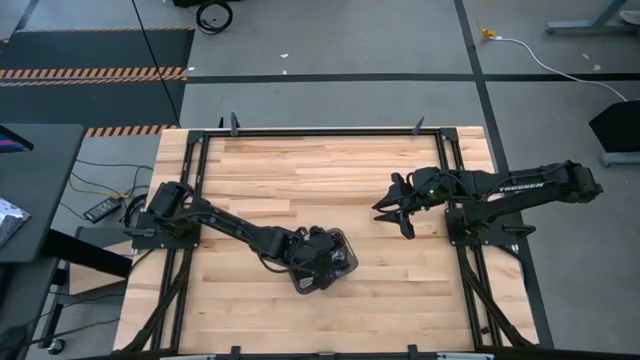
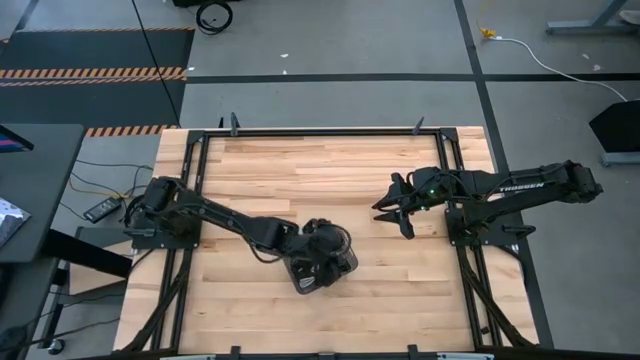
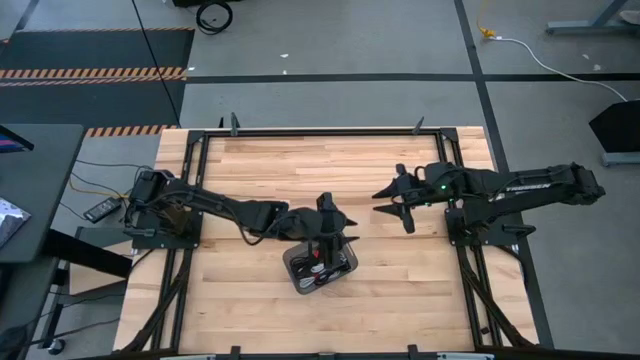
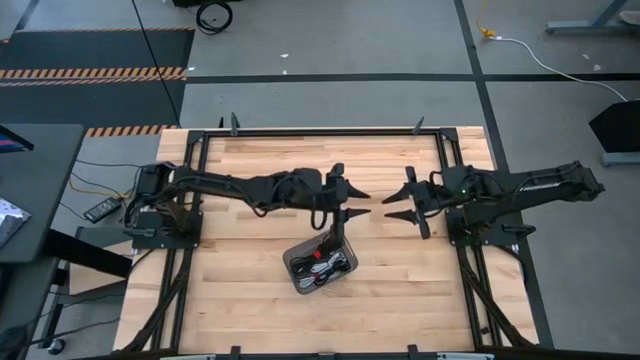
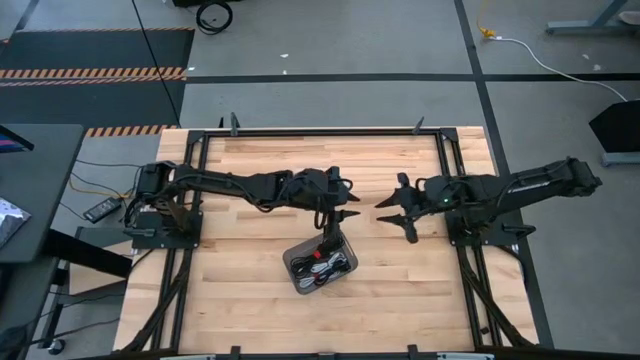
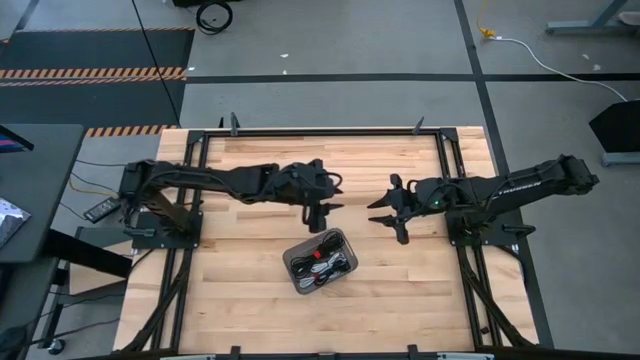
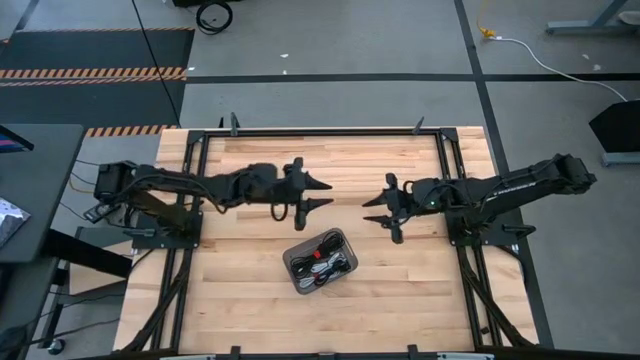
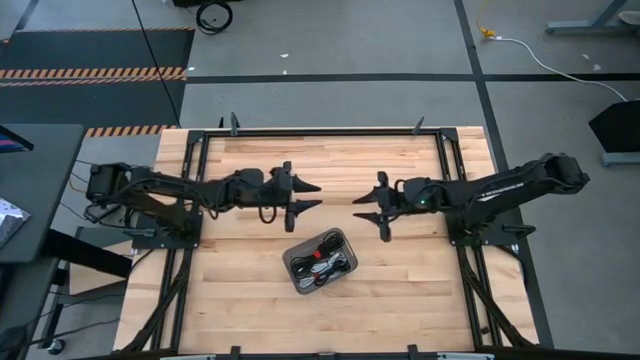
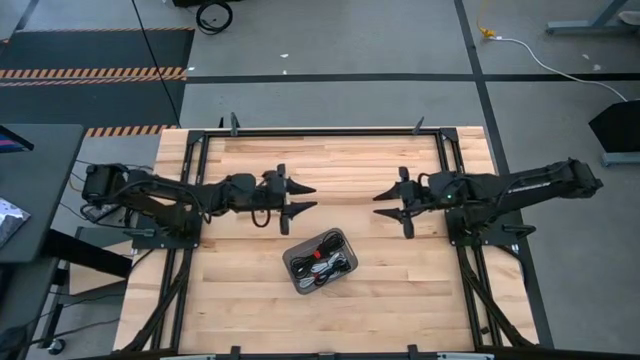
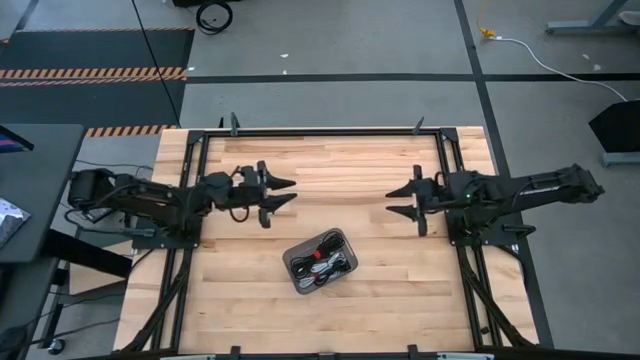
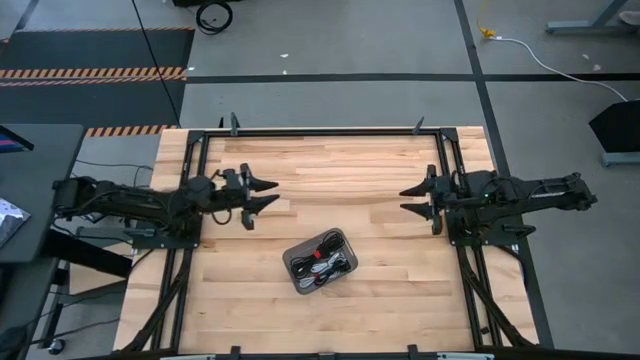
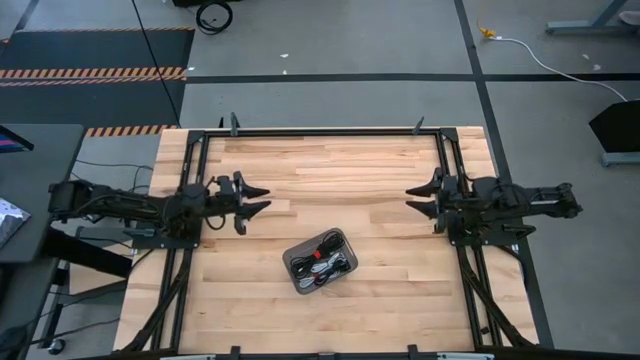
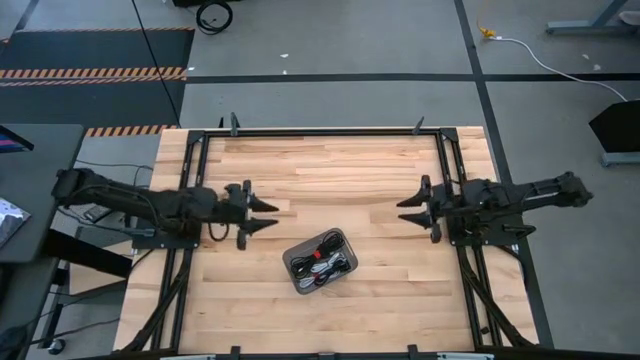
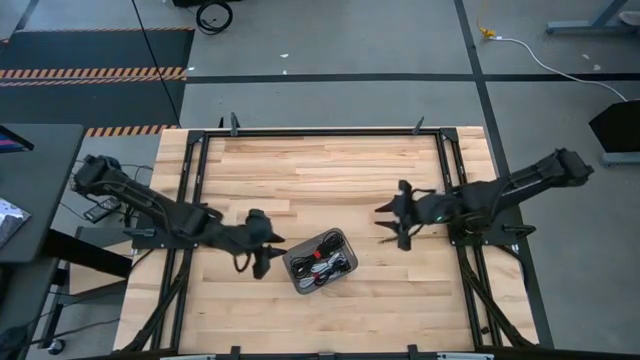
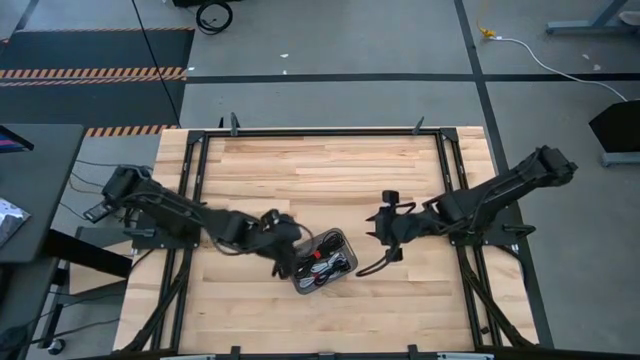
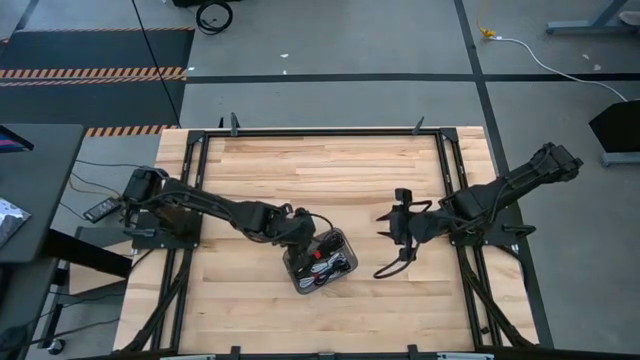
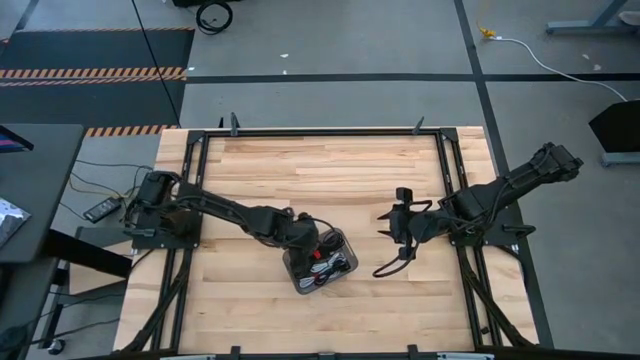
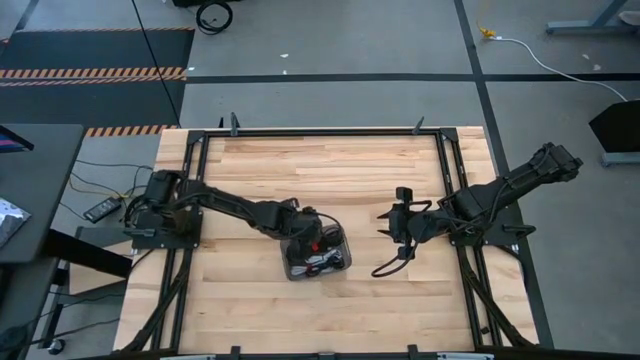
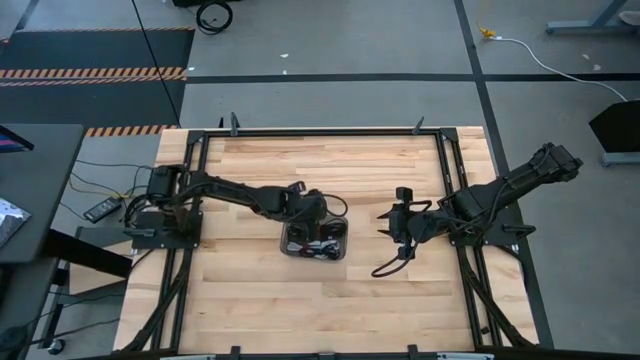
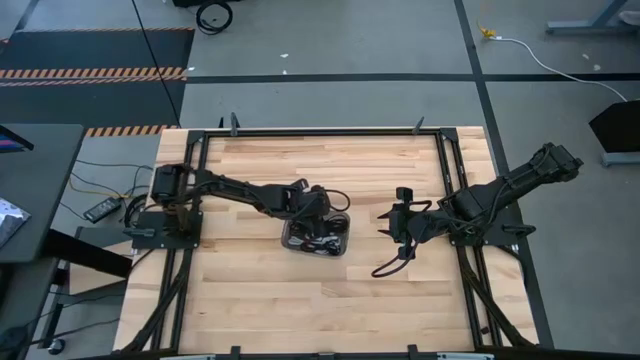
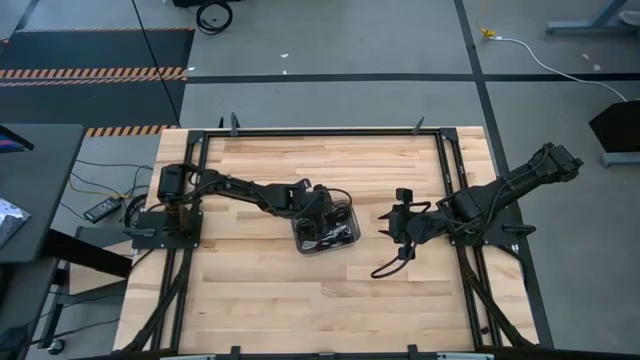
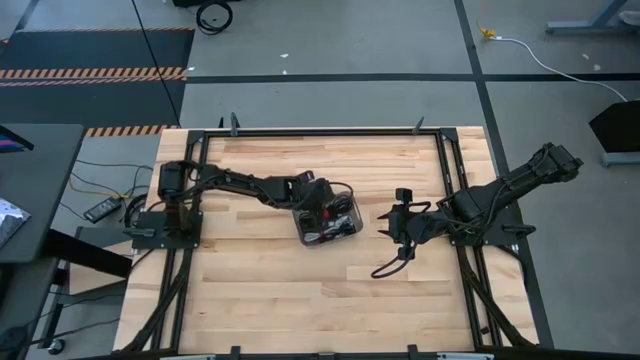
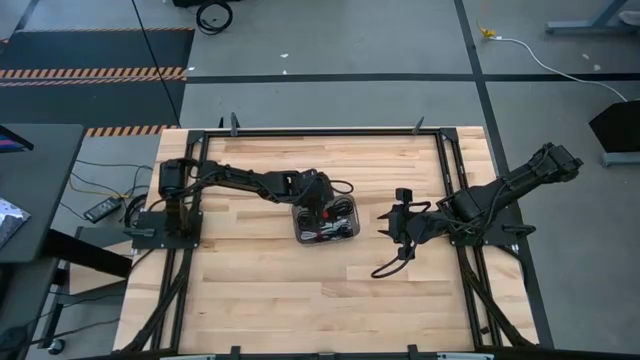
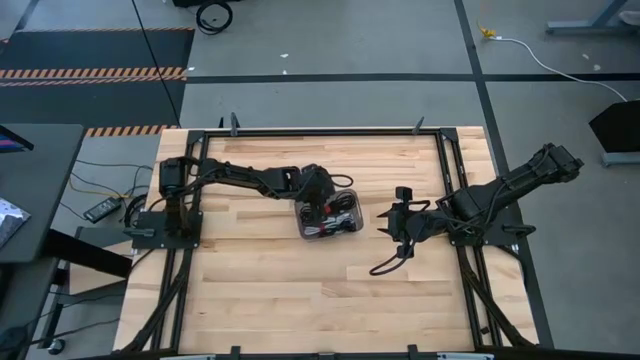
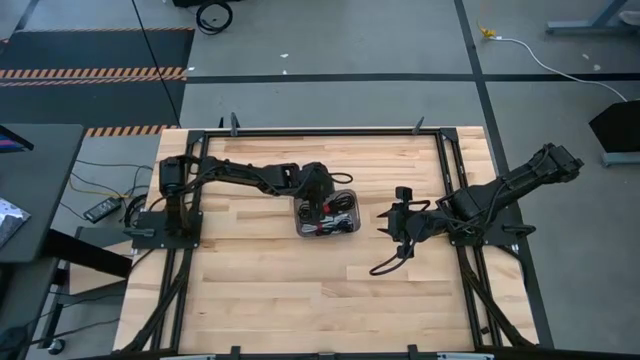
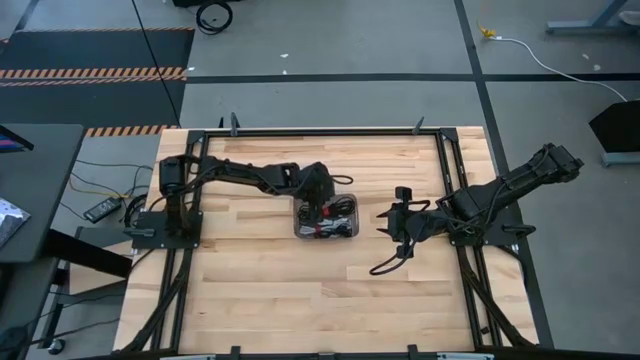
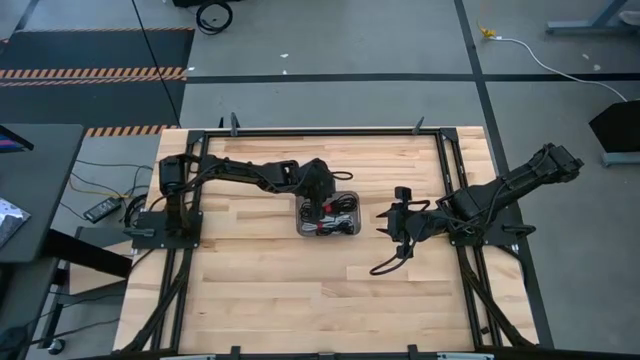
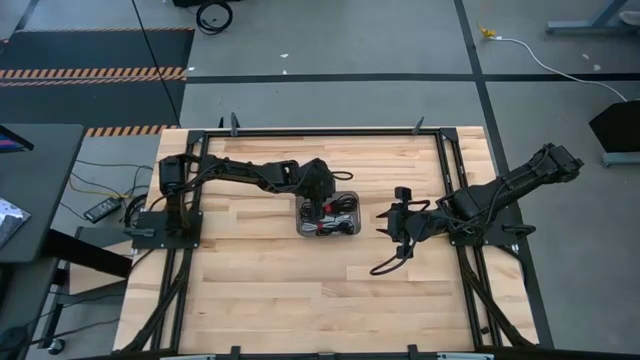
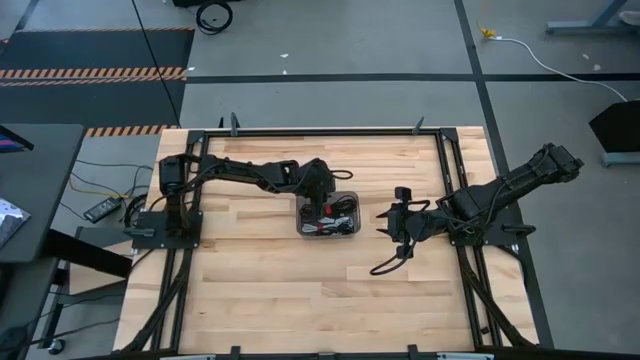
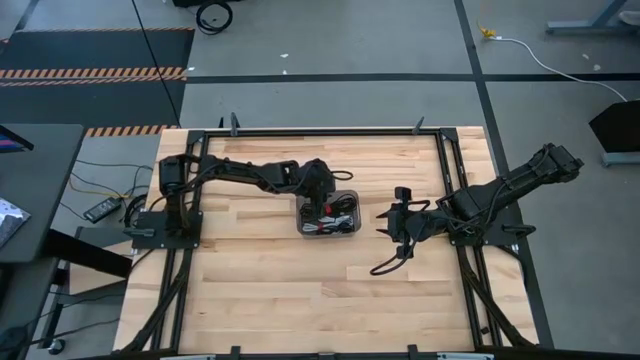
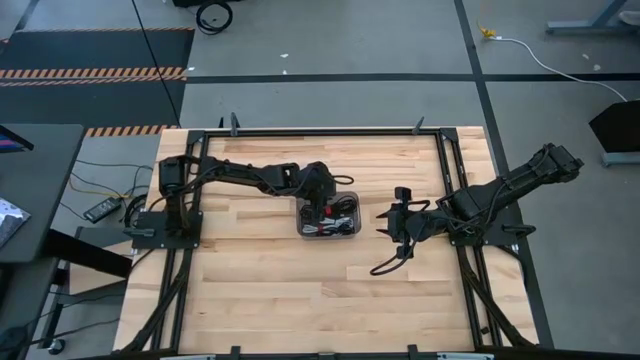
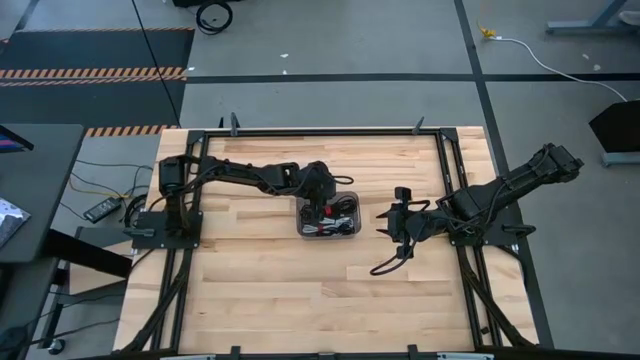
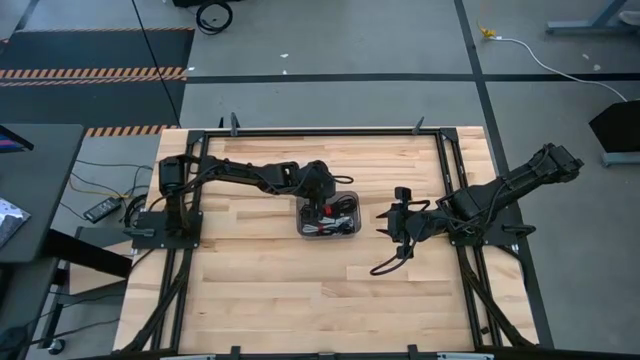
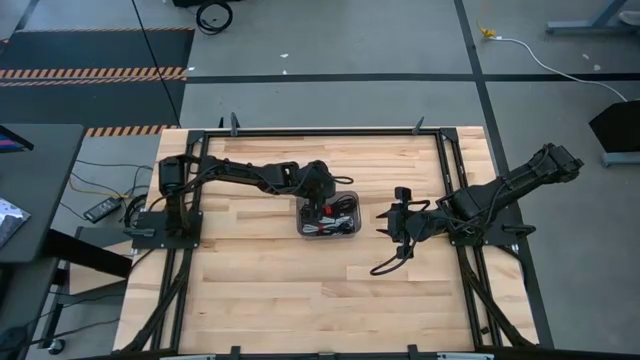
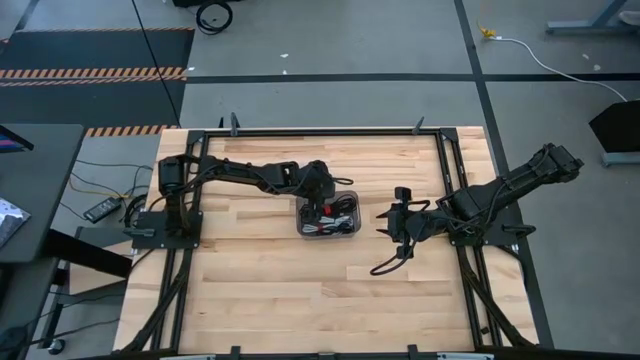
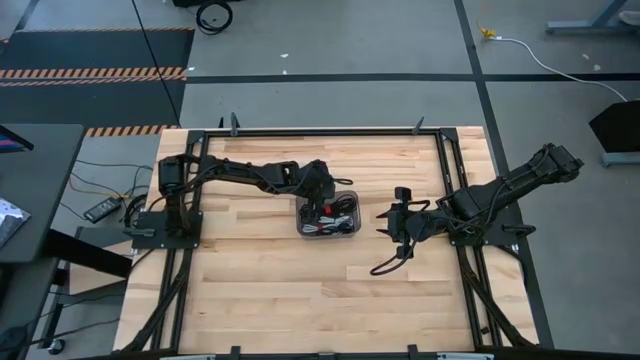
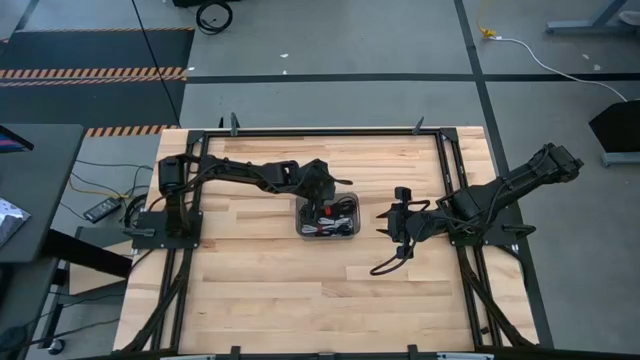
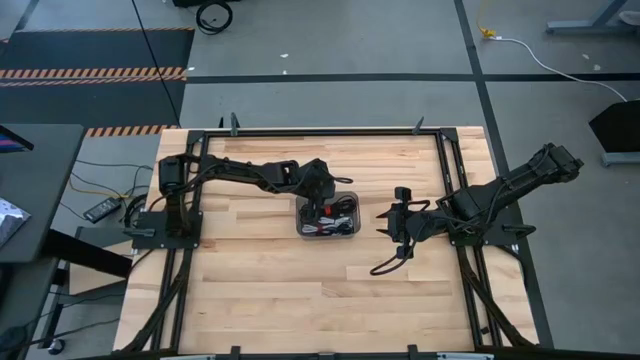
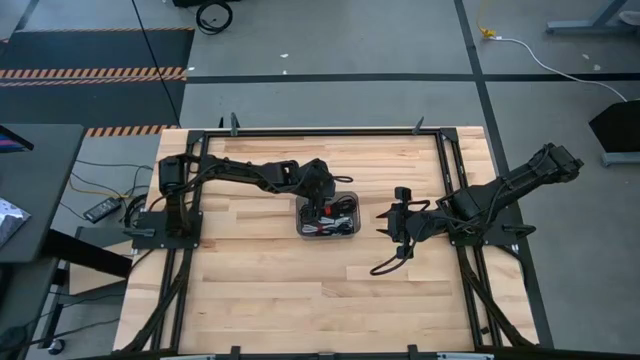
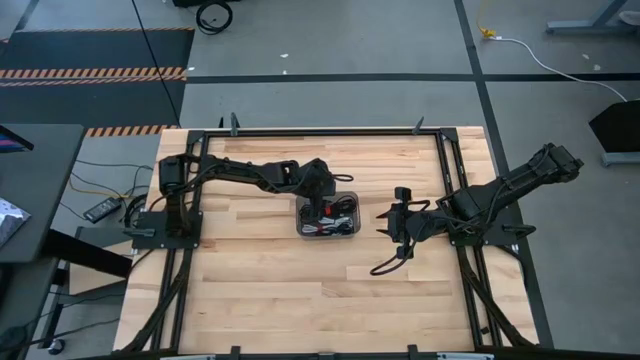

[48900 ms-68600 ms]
Task: Pick and place USB-C Cables
Adjust the black bin

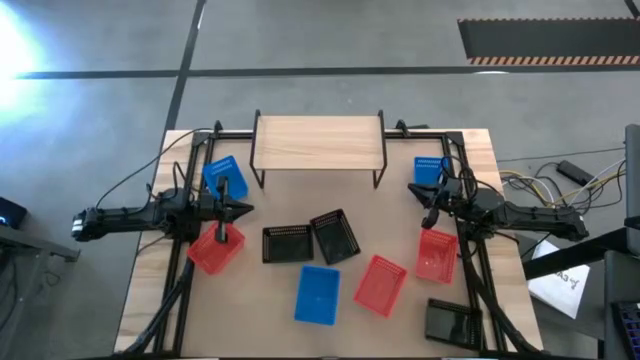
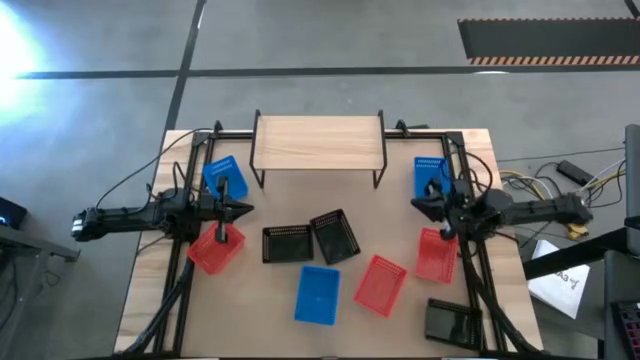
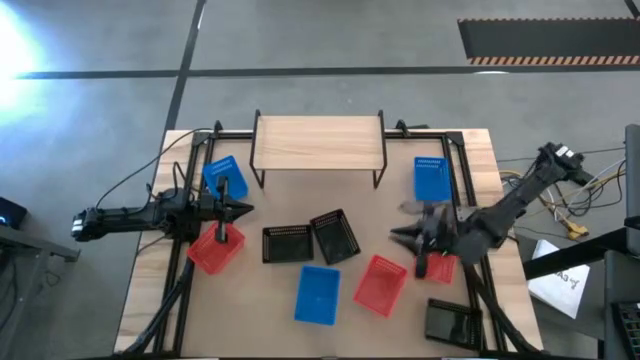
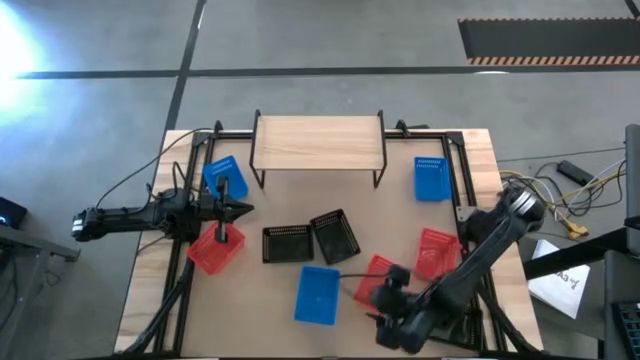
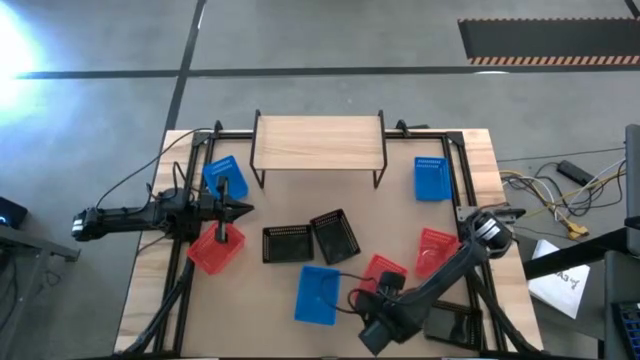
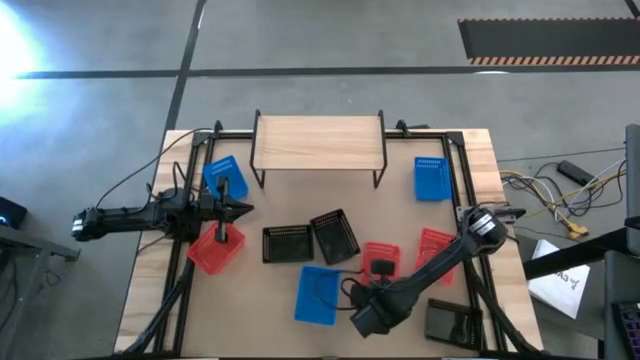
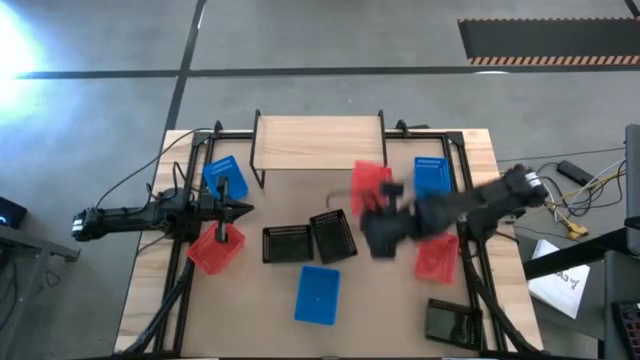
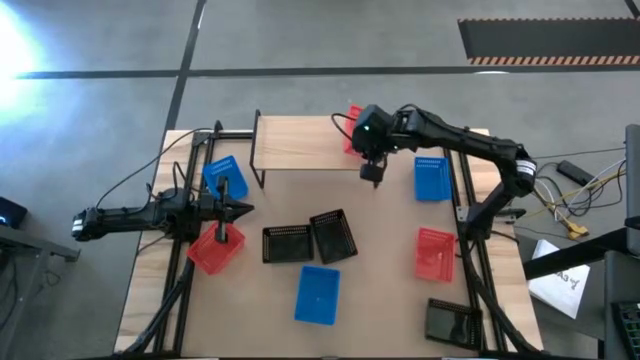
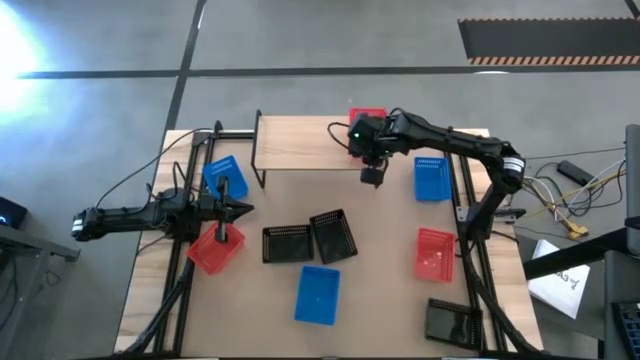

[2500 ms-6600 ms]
Task: Stack baskets on shelf by color
Put the middle red bin on the shelf
